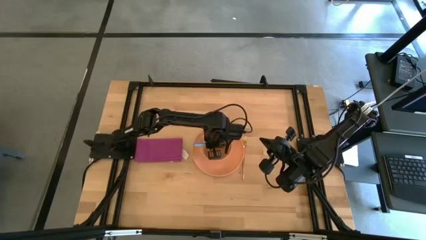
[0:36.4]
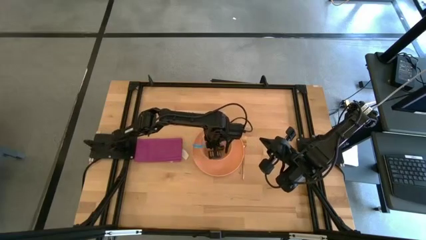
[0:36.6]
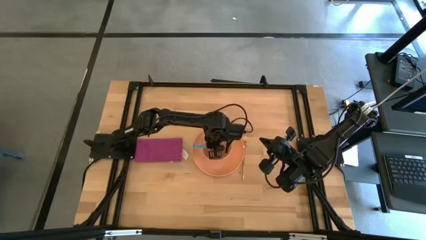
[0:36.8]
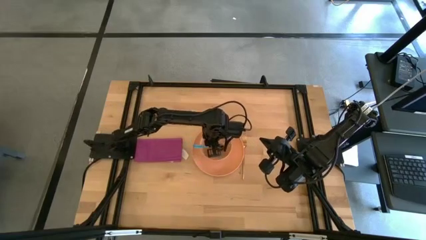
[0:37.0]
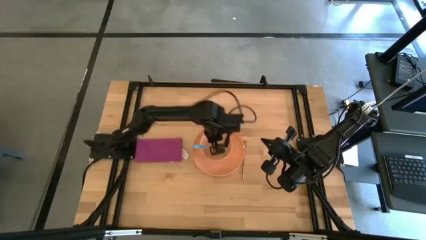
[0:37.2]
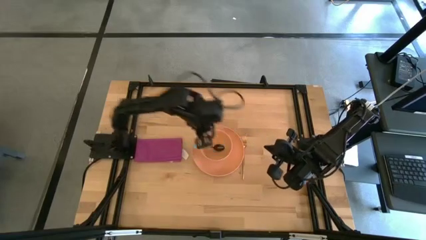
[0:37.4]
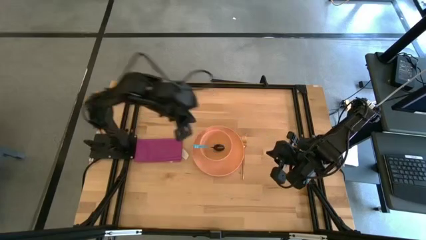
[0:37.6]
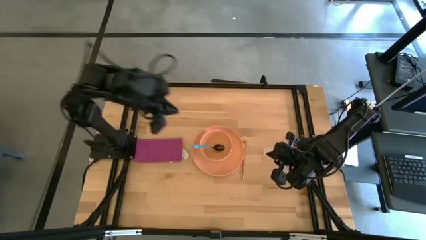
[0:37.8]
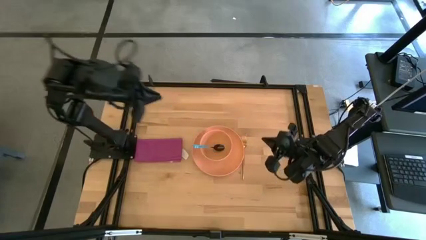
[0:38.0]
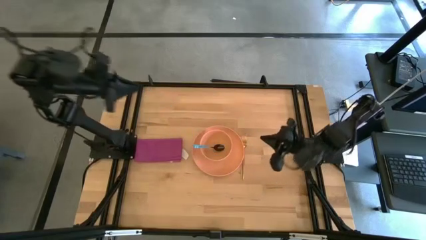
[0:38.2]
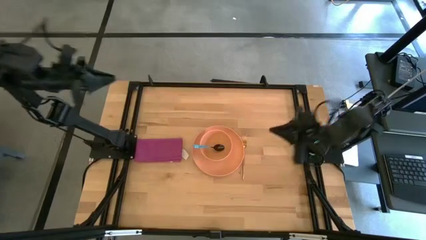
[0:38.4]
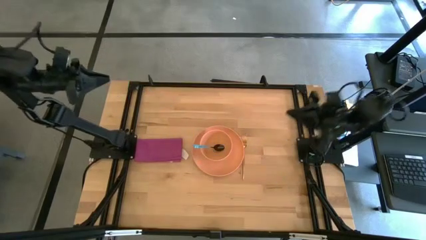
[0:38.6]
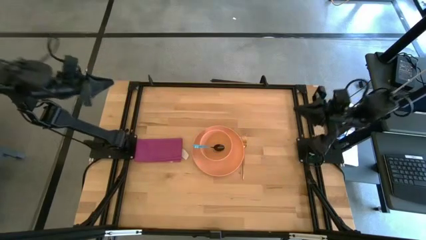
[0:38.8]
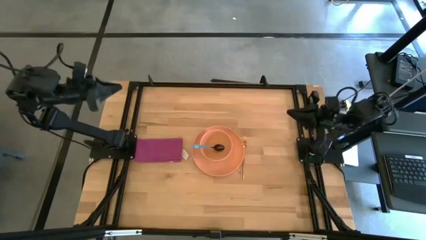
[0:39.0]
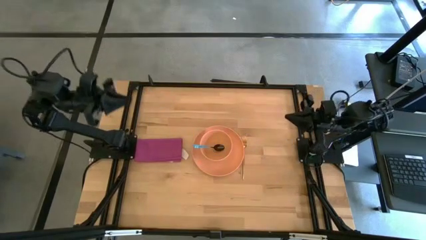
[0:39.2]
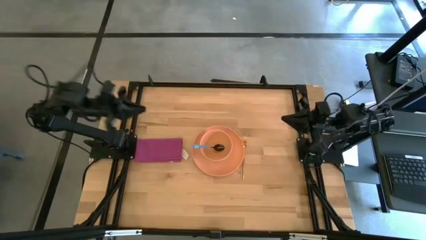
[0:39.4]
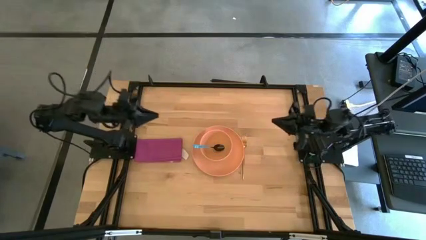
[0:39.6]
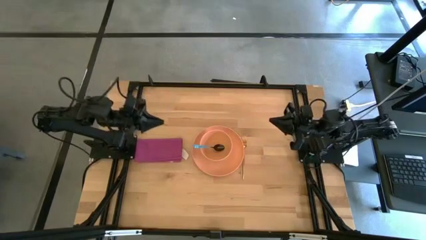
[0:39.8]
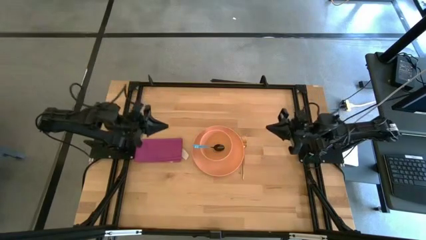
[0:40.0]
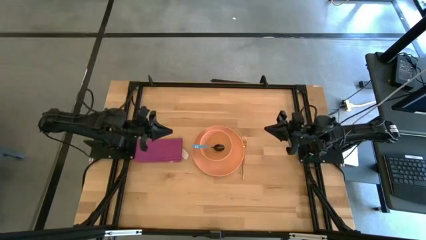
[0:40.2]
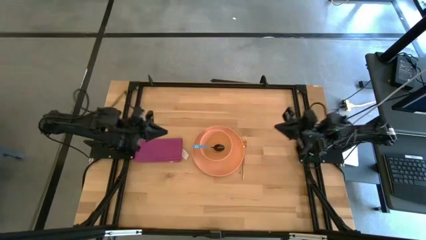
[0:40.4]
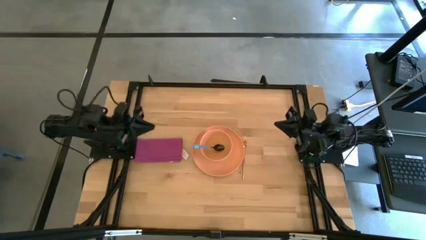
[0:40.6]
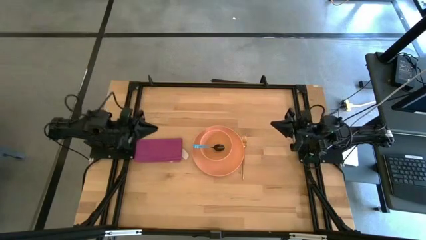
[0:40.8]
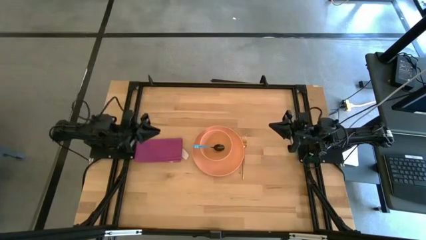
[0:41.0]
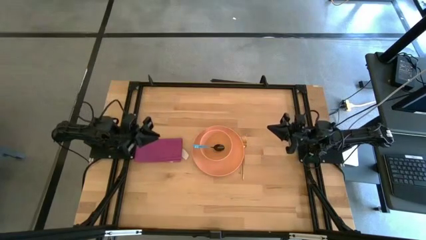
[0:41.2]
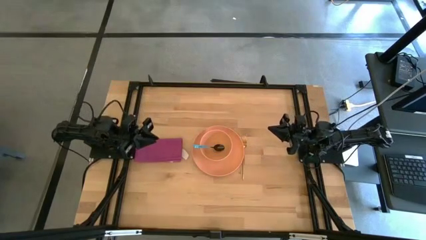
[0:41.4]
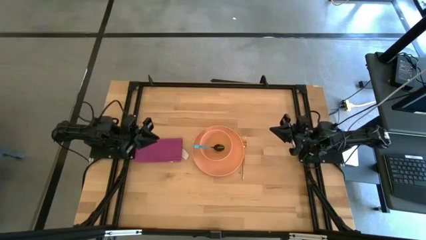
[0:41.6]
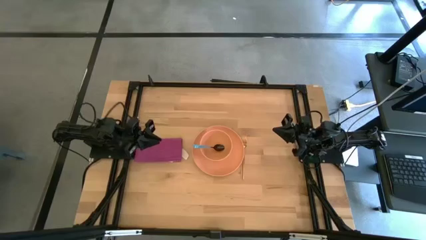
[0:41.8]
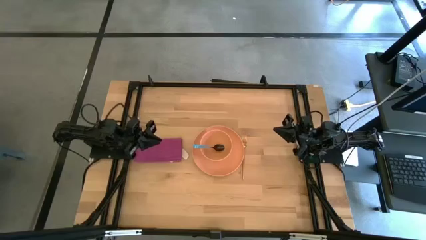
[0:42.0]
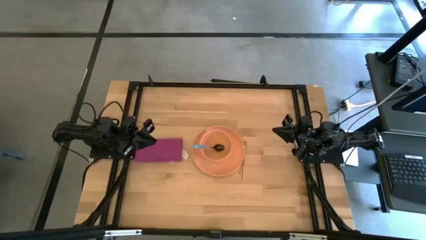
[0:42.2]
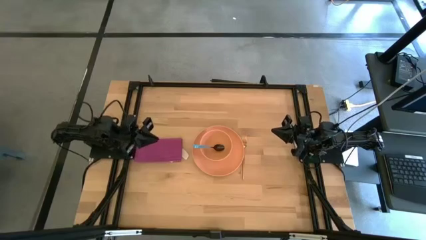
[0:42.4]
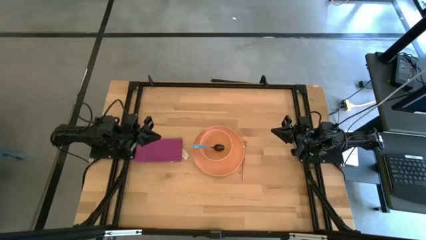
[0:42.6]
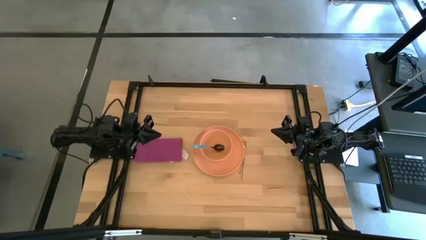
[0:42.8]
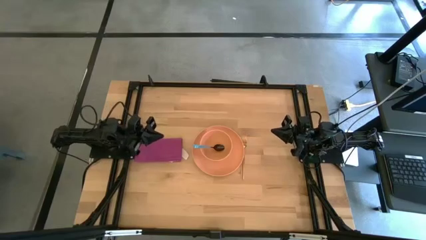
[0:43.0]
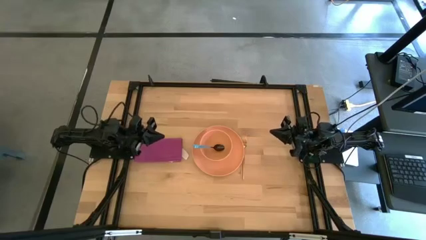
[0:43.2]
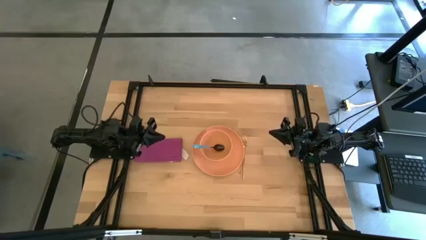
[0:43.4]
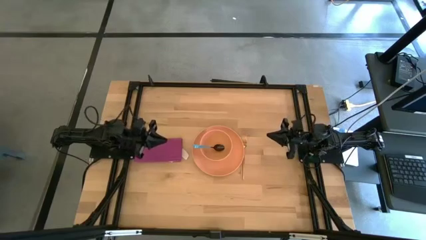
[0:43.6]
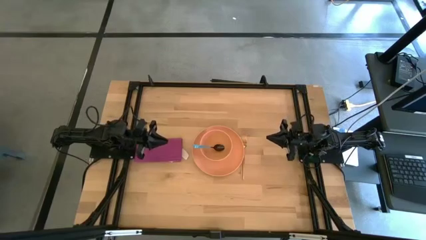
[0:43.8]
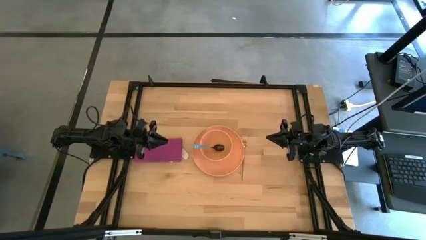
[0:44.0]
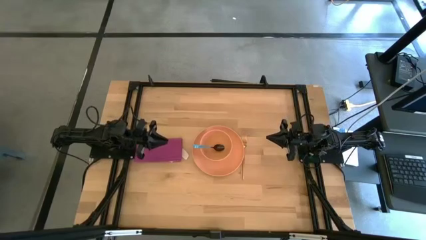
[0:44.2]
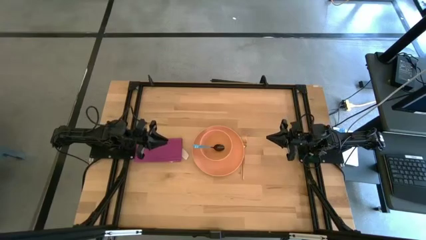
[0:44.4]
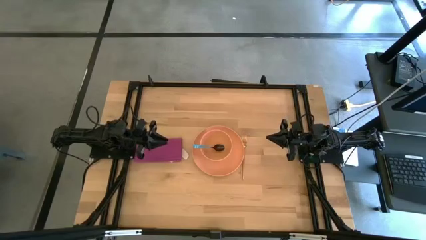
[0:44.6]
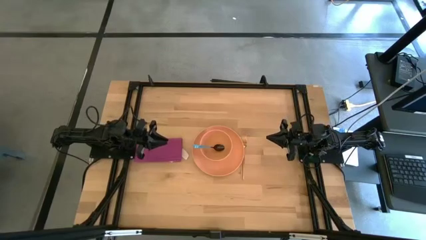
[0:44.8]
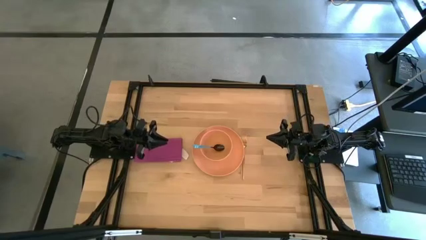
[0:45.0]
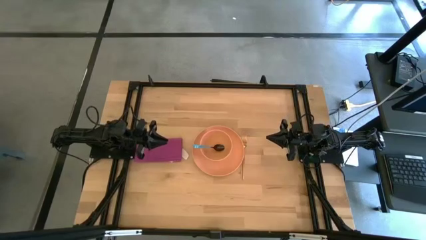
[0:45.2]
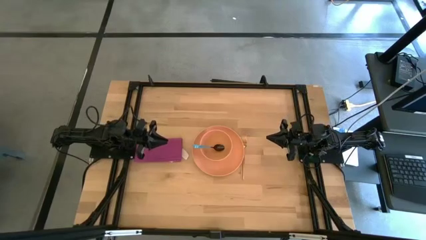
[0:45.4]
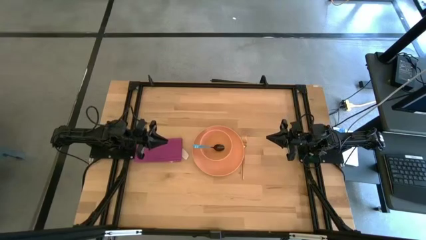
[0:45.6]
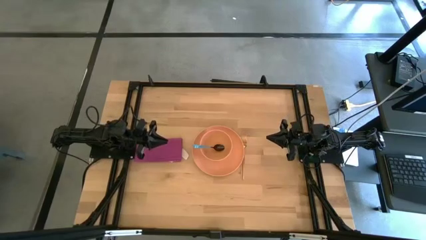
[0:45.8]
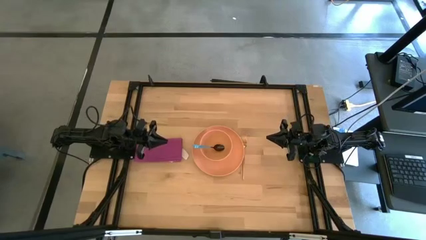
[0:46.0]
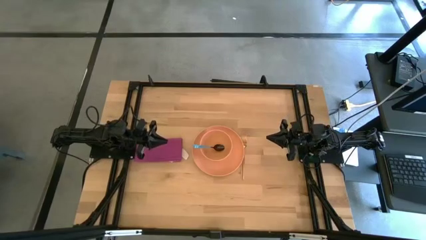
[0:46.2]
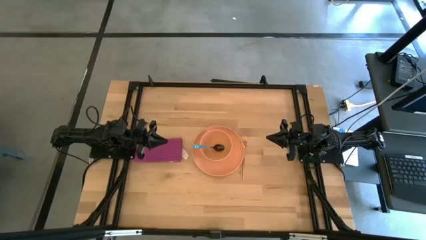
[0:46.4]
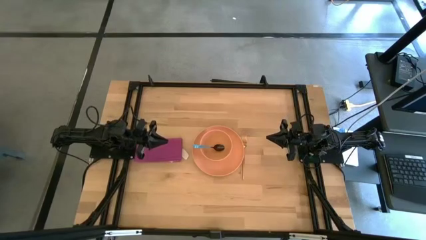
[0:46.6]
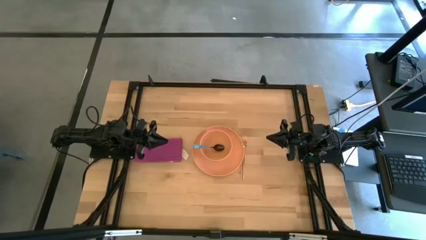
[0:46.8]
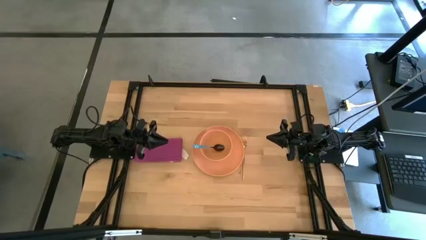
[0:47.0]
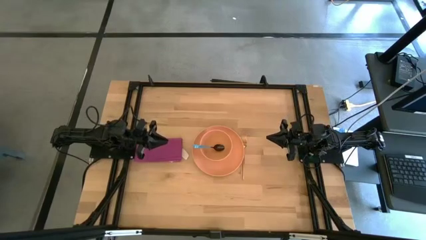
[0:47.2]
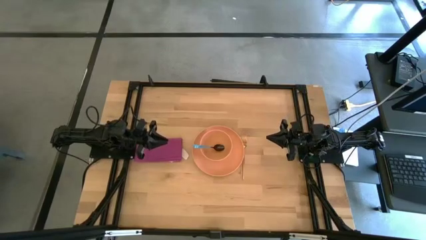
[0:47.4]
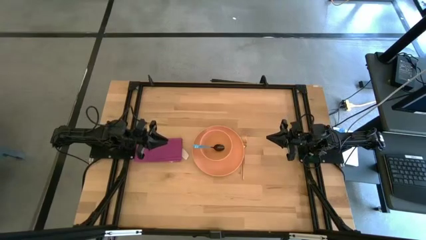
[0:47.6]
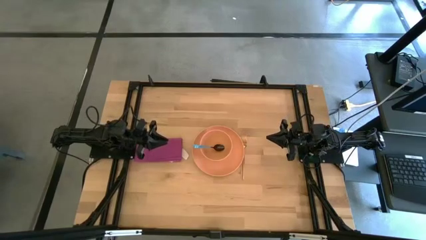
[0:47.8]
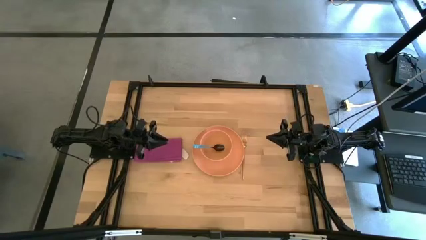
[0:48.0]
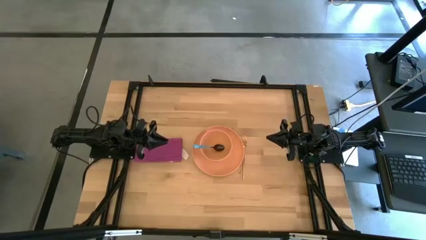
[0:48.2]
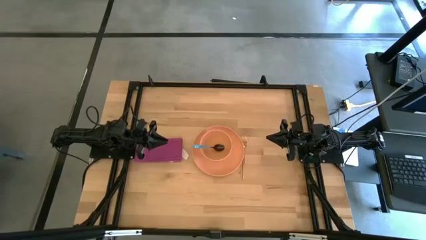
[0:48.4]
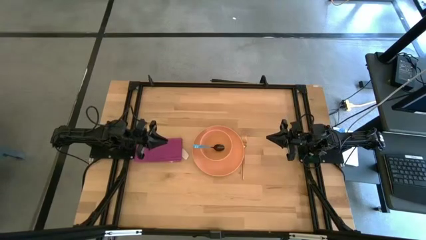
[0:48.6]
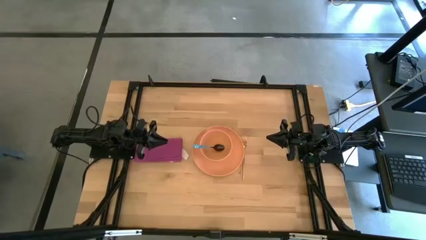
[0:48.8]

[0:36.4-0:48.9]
Task: Set table place
Return to Home Position
